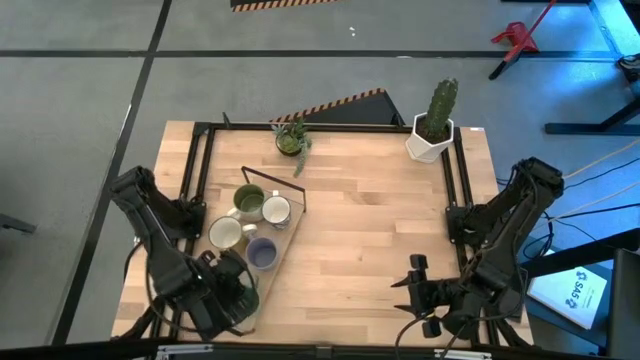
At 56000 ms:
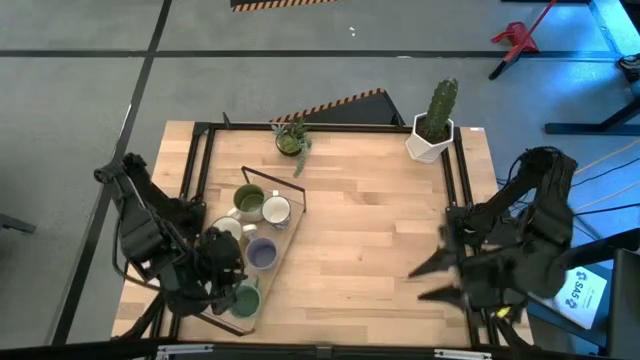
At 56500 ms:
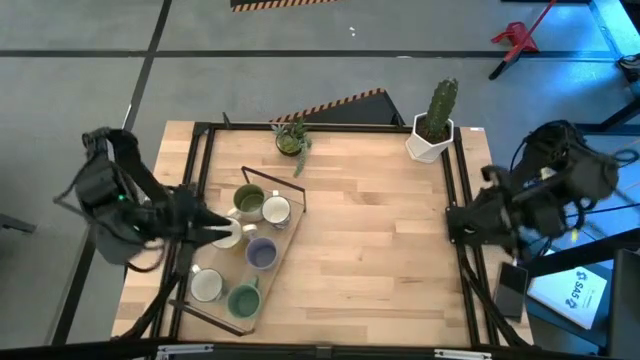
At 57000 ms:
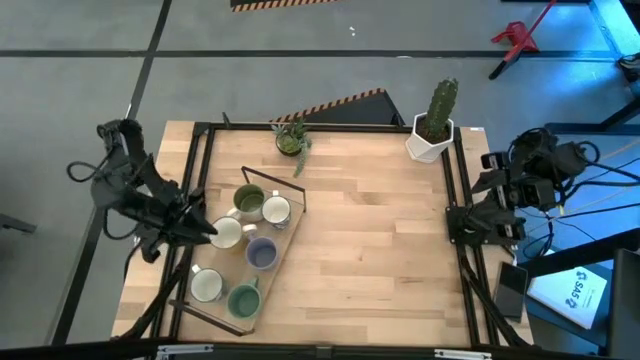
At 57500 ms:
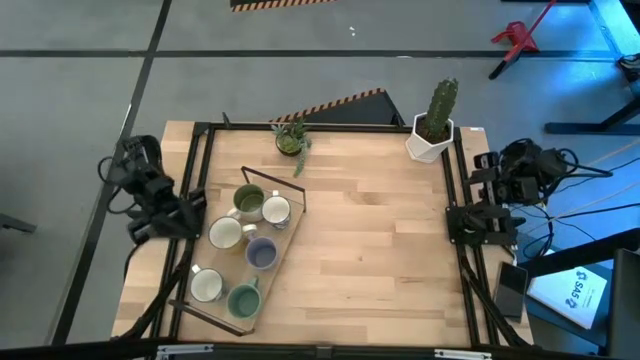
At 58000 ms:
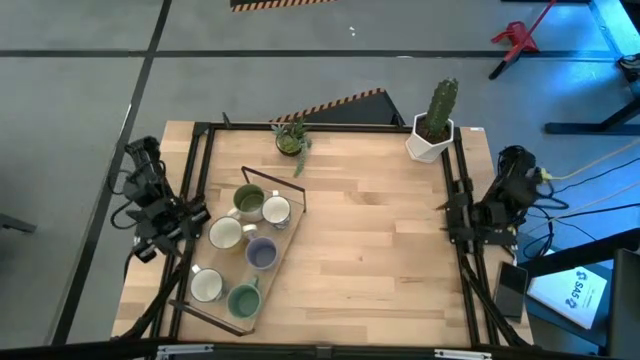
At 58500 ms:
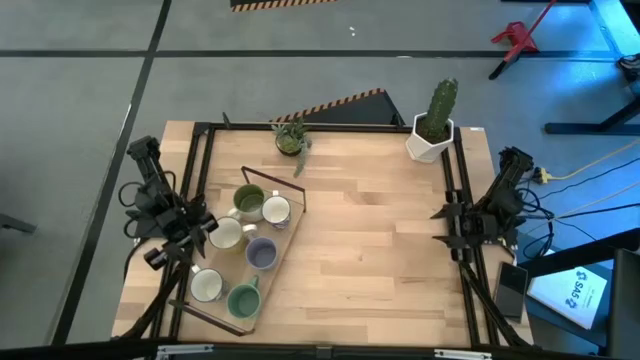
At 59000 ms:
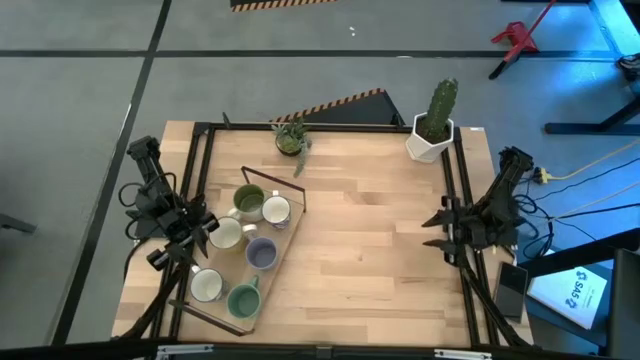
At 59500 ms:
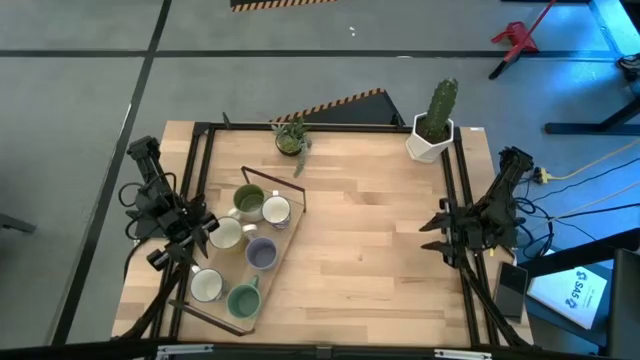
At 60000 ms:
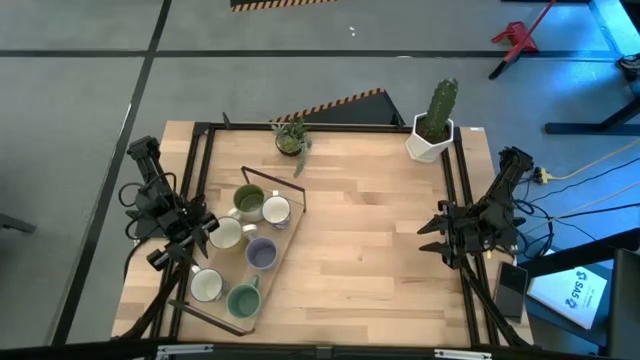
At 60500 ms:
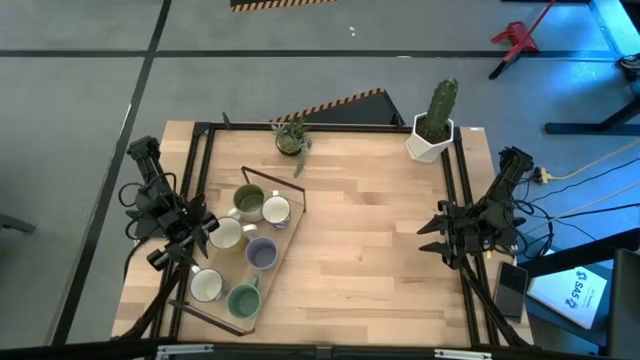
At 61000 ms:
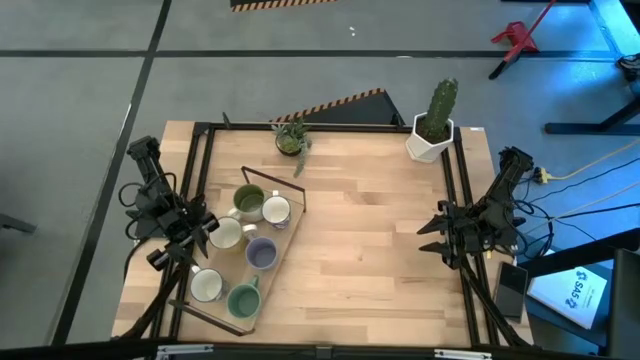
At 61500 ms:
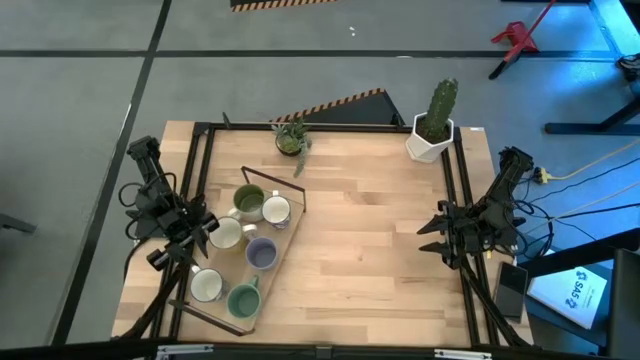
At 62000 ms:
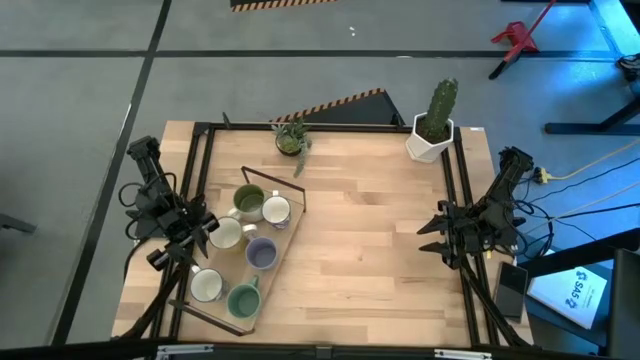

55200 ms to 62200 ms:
Task: Place coffee mugs
Return to Home Position

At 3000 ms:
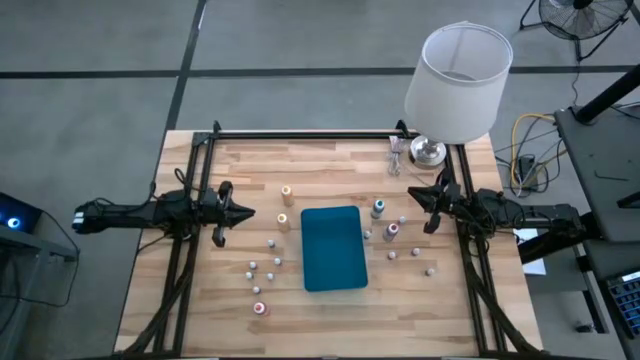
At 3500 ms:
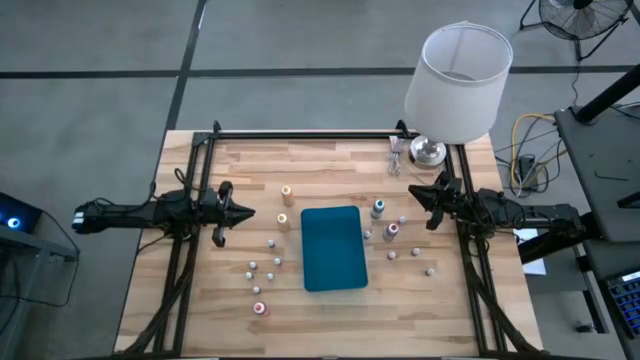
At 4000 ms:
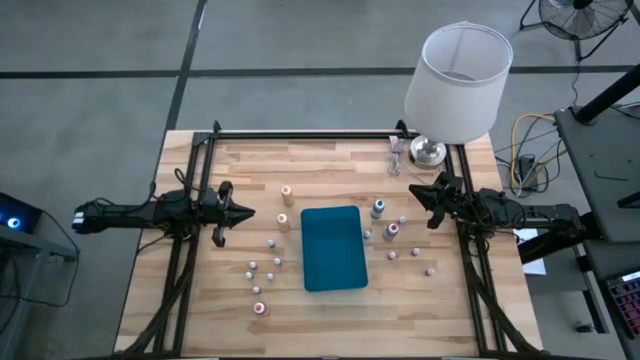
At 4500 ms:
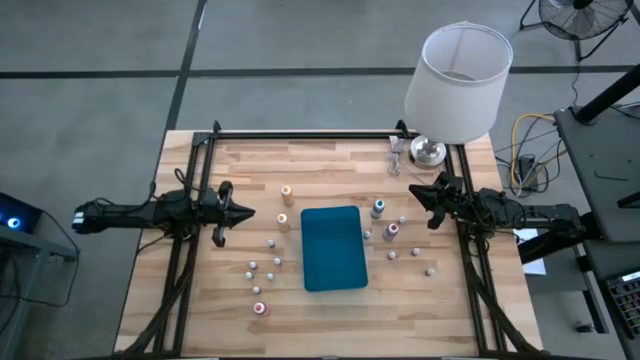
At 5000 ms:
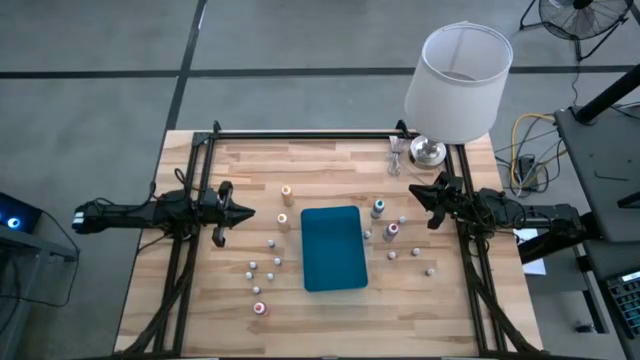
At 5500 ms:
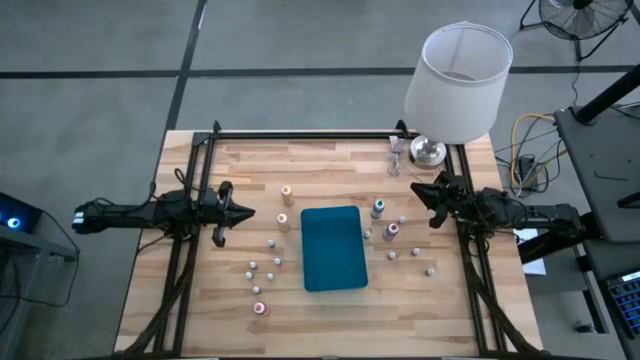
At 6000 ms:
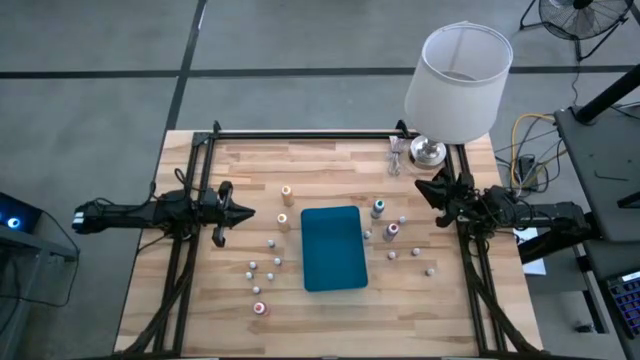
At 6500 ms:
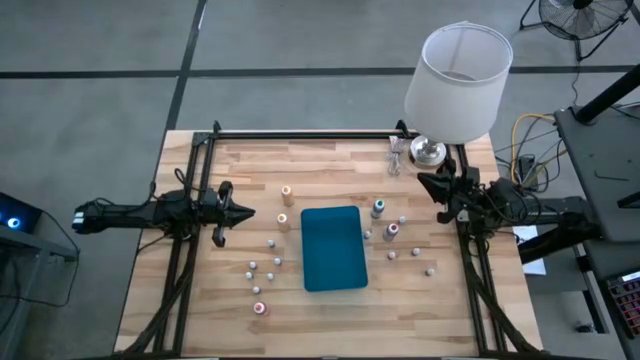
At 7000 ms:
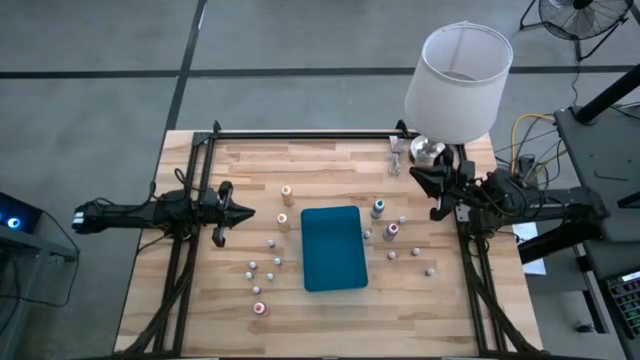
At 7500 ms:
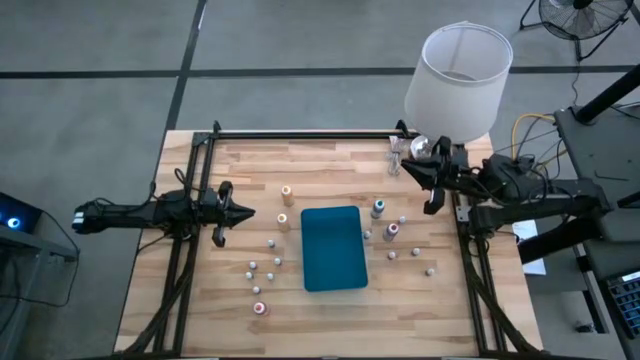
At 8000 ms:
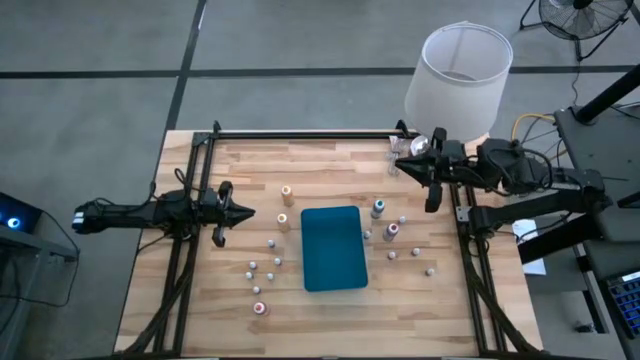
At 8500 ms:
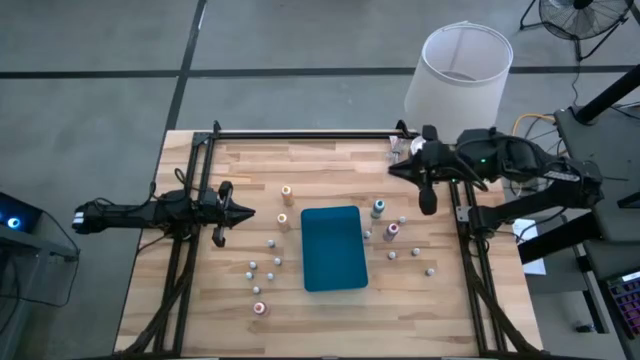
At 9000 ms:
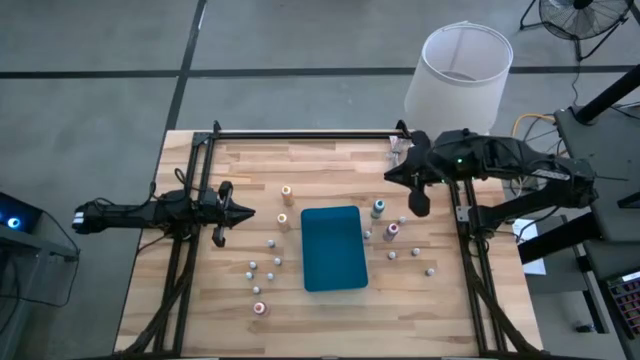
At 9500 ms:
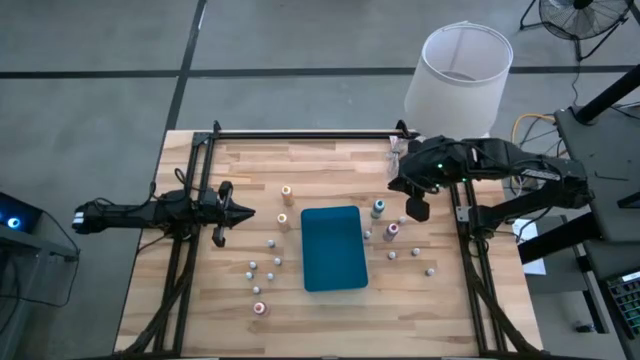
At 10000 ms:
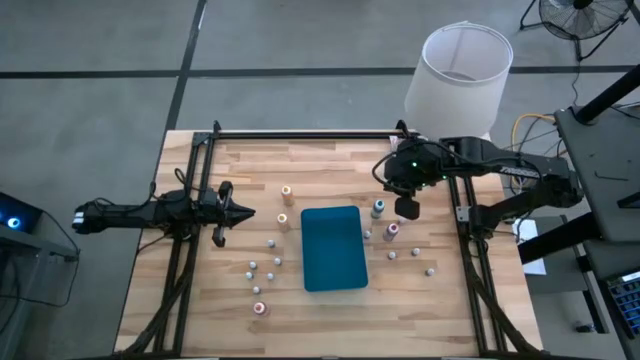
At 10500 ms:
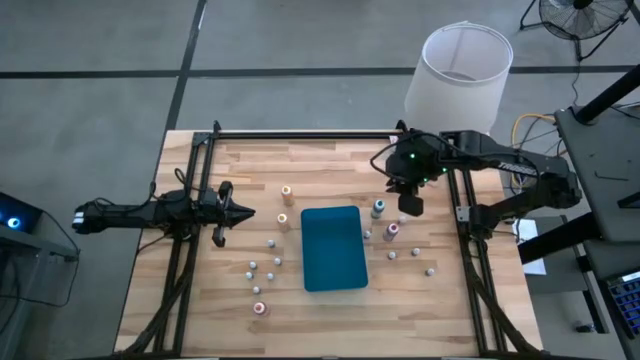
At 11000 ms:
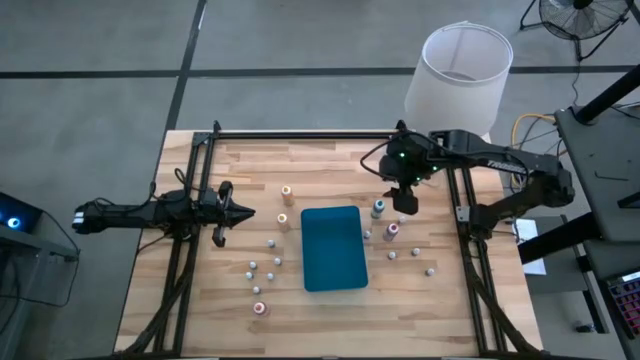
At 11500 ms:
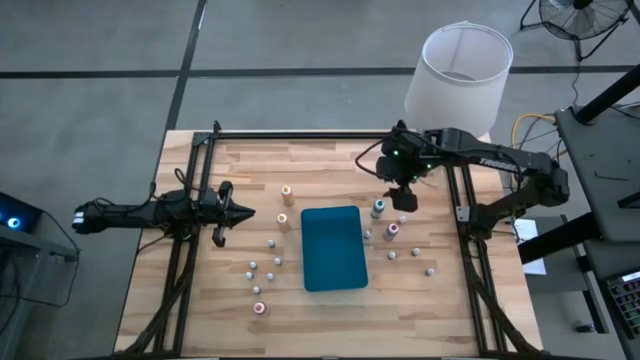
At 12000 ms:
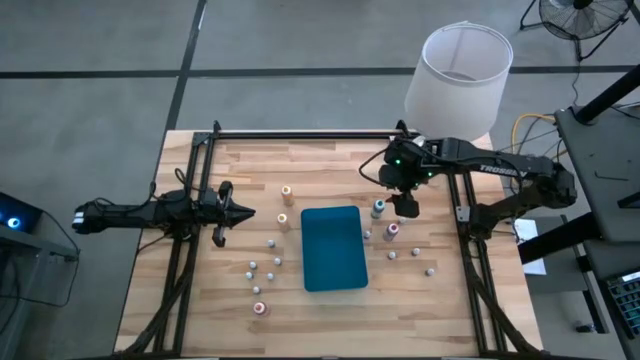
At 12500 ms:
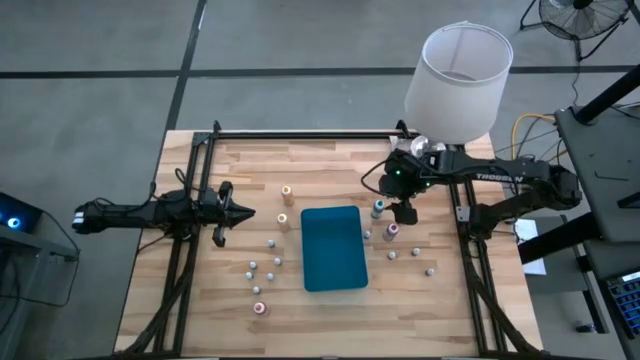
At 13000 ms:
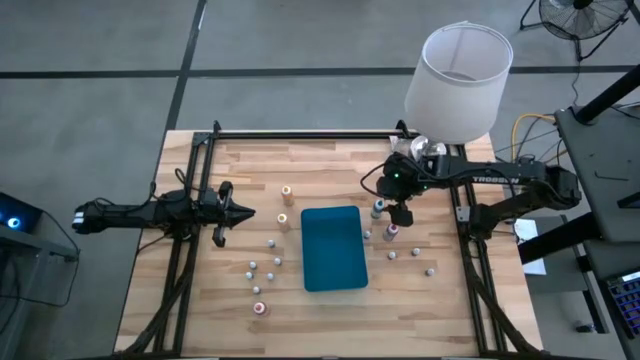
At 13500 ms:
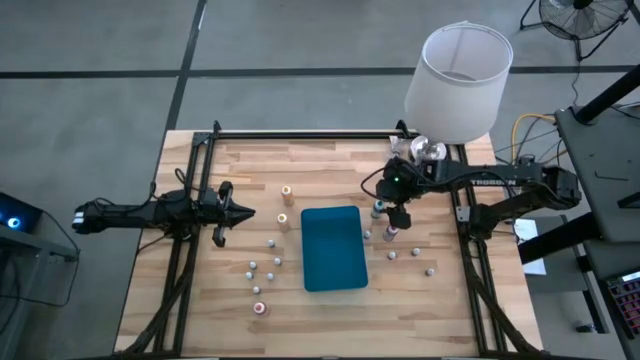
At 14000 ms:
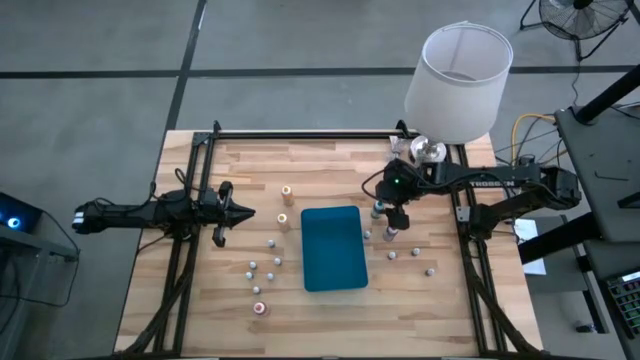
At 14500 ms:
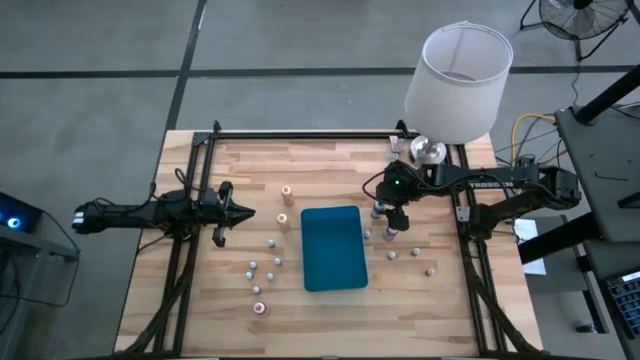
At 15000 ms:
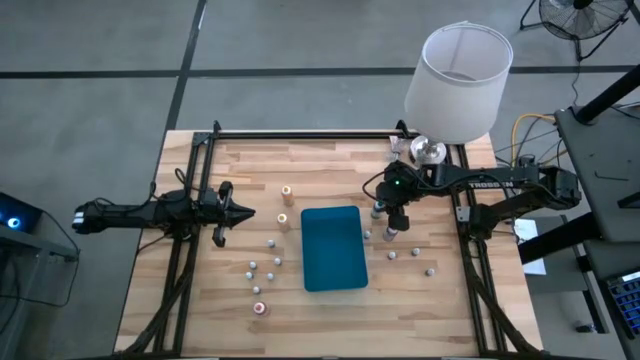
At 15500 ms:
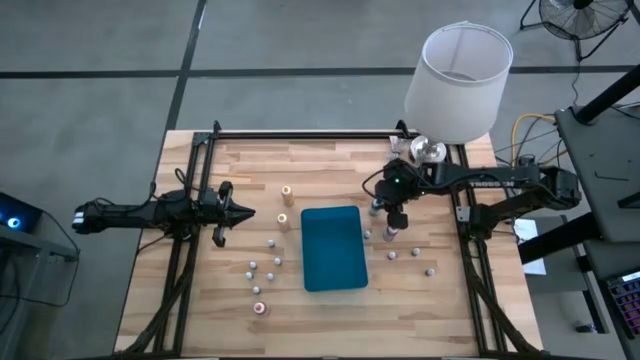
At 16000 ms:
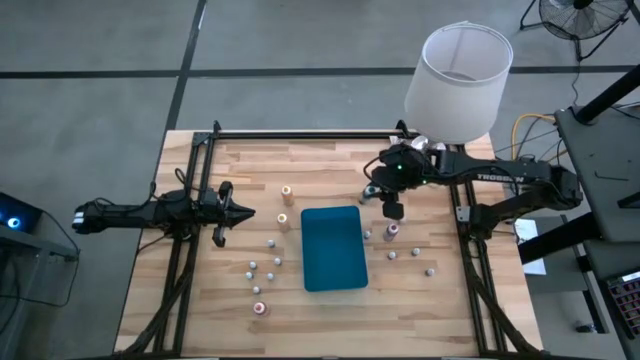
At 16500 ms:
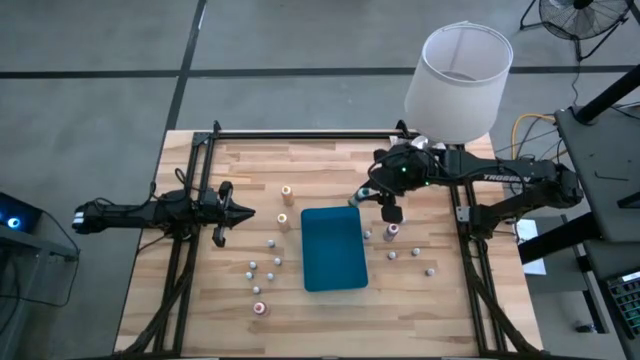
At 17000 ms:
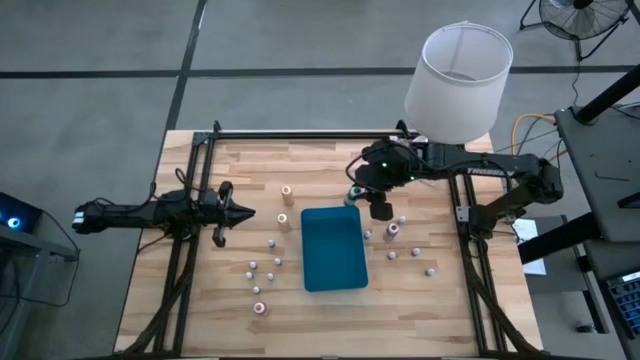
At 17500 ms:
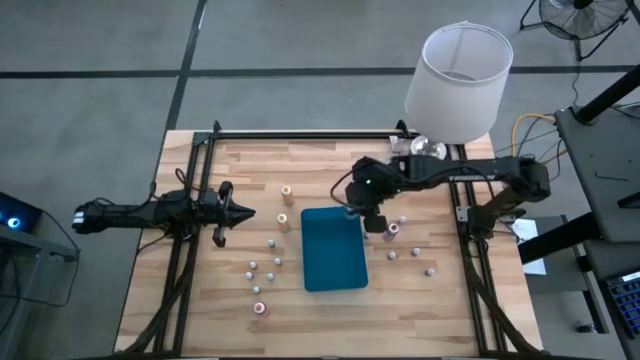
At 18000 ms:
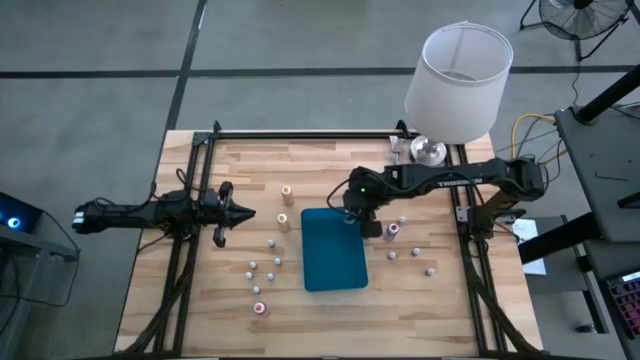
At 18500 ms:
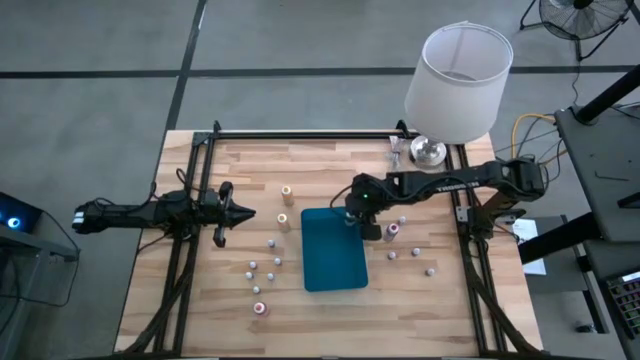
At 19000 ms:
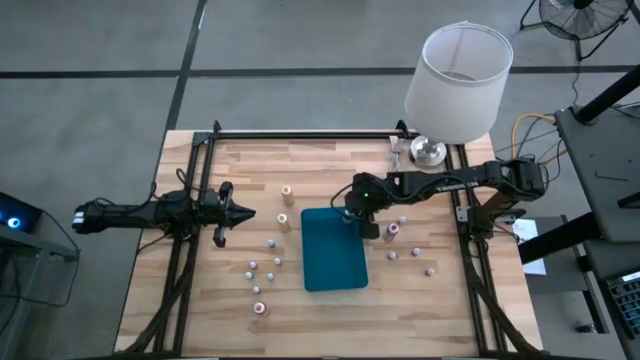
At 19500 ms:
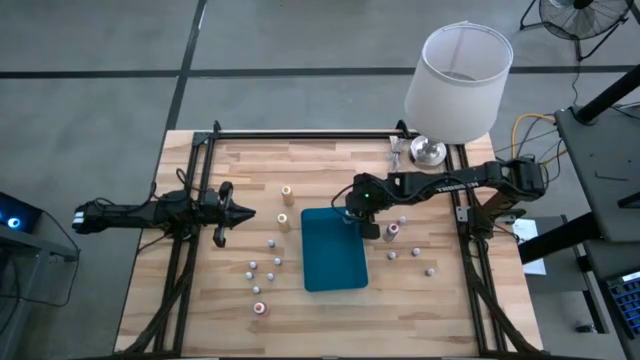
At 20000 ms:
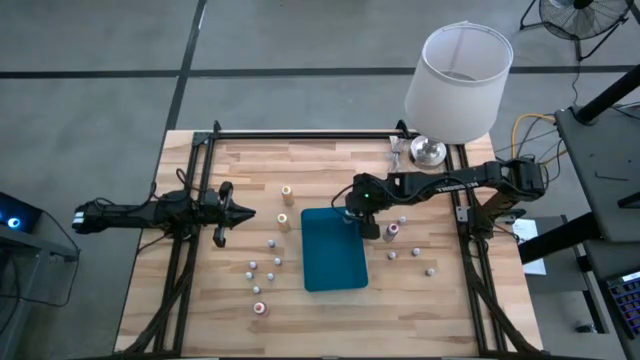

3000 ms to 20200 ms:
Task: Pick & Place food coloring
Put the large green food coloring bottle into the blue bin
